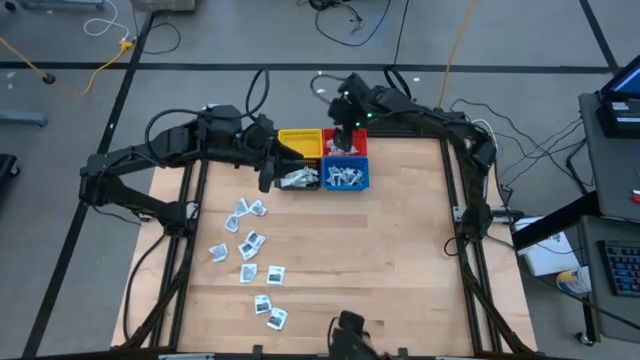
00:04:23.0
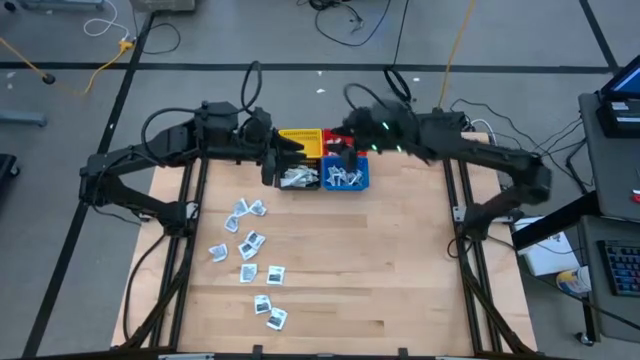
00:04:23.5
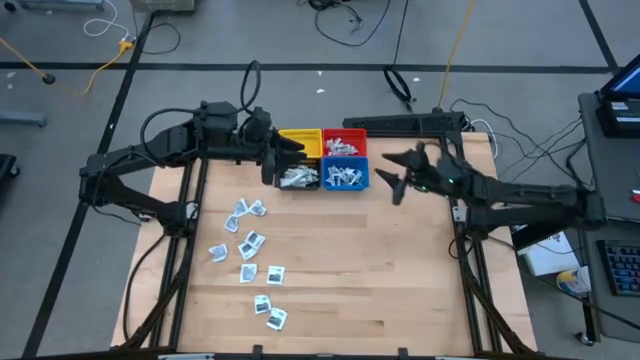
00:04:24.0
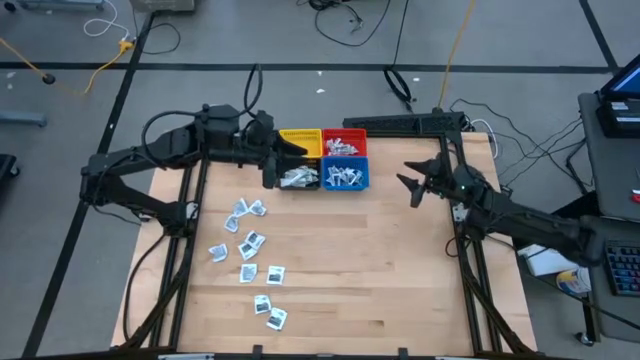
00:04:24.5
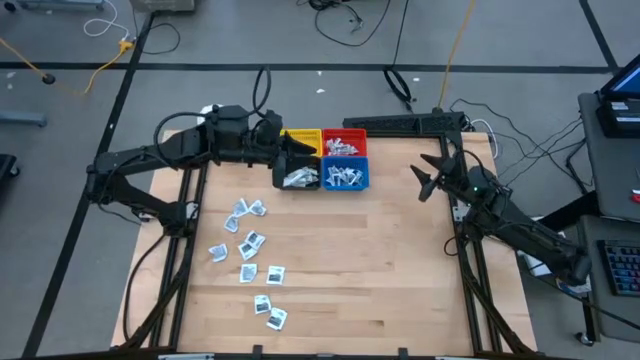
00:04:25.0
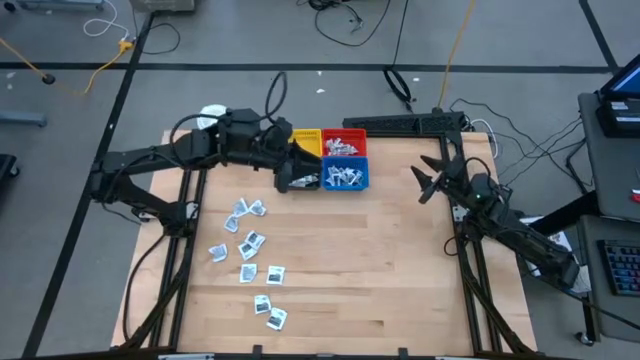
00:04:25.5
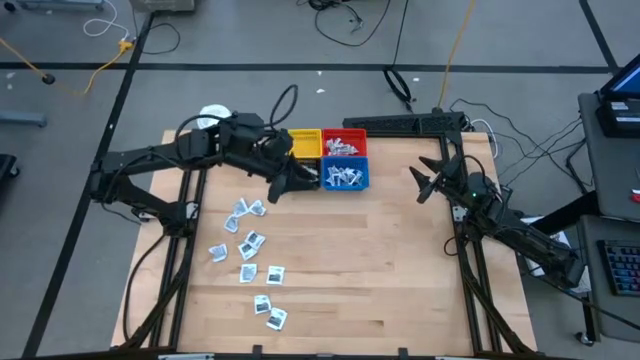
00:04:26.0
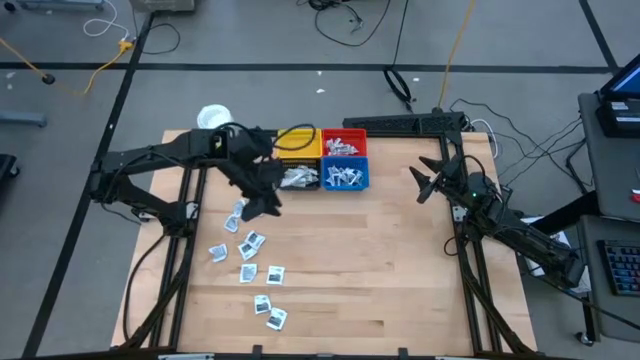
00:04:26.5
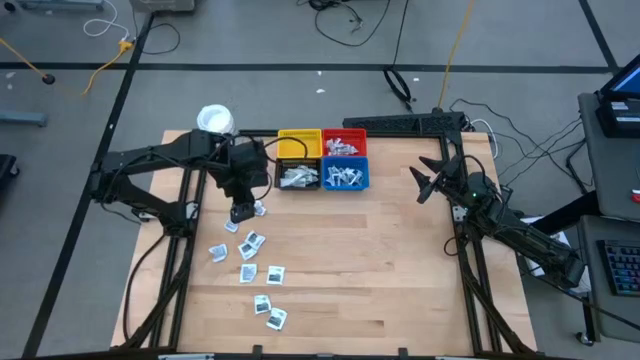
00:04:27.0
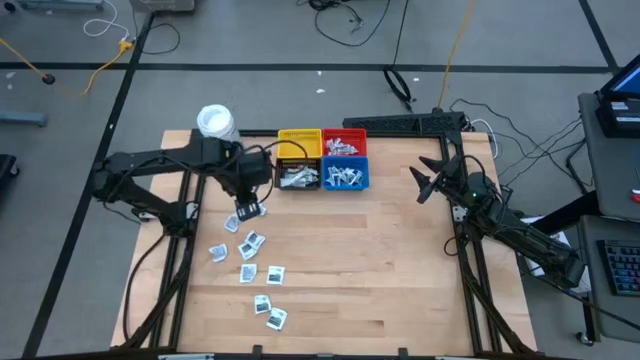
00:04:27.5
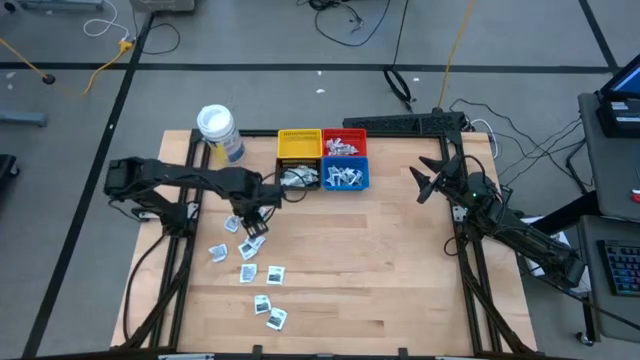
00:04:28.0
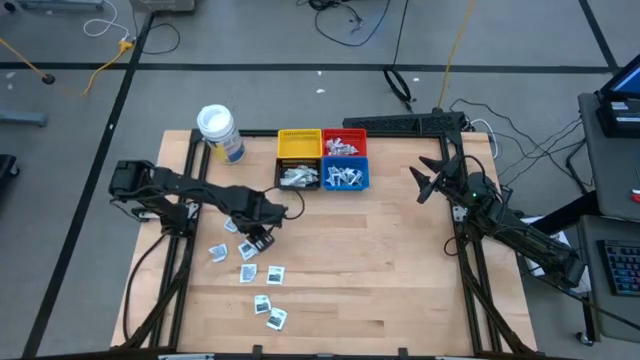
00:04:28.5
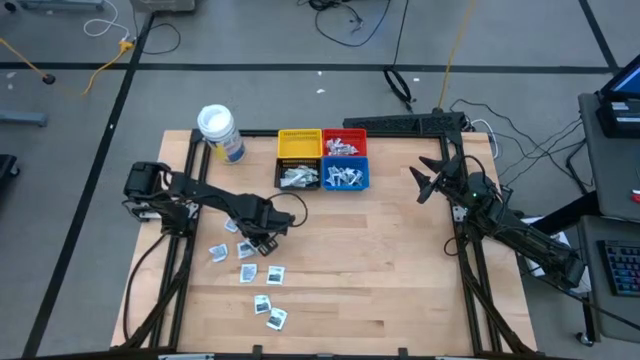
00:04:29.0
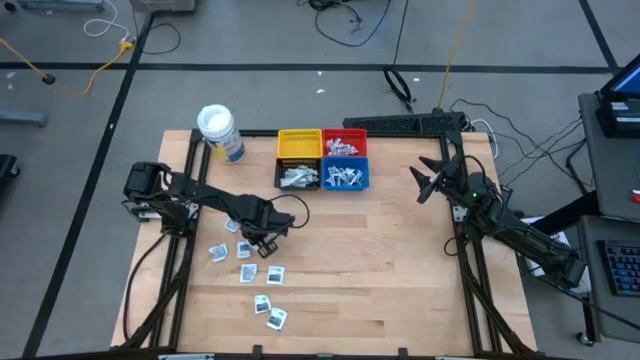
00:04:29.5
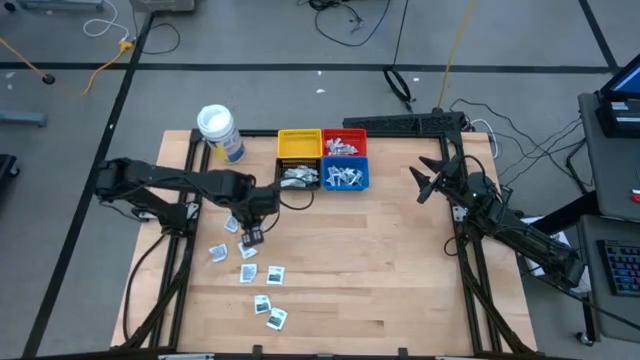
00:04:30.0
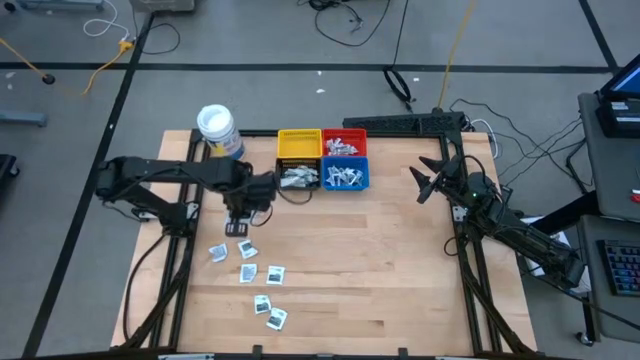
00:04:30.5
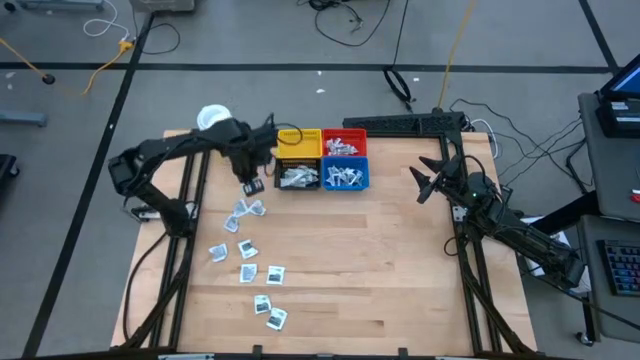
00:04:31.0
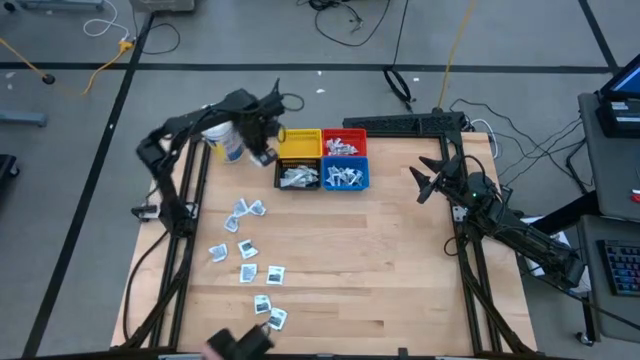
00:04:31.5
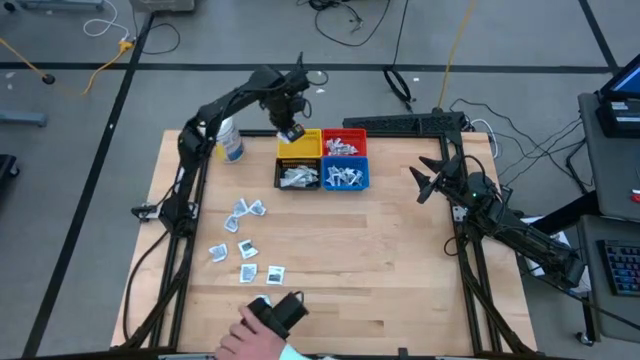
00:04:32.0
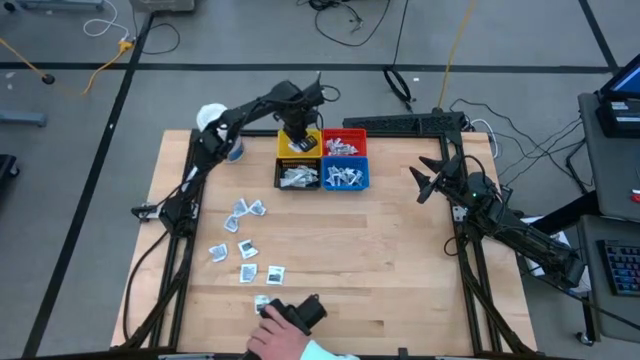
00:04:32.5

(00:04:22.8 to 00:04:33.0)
Task: Pick & Place First Aid Supplies
Put the gray towelette pack into the yellow basket

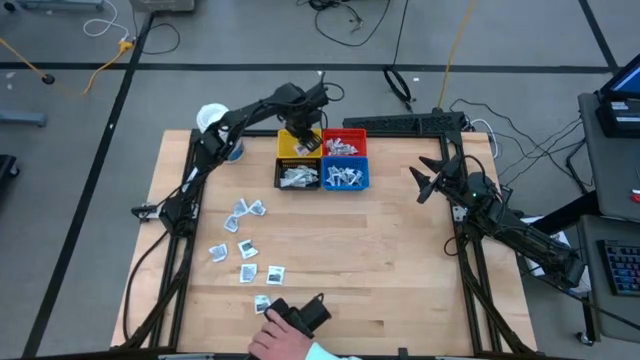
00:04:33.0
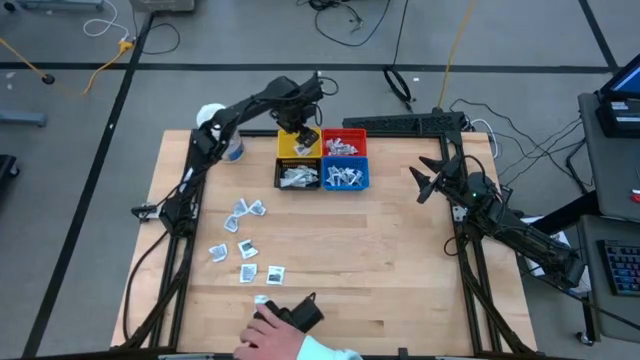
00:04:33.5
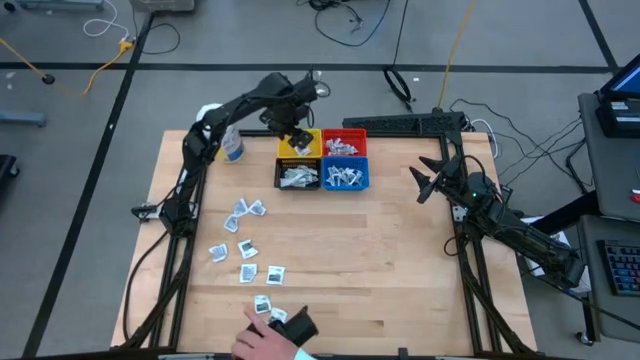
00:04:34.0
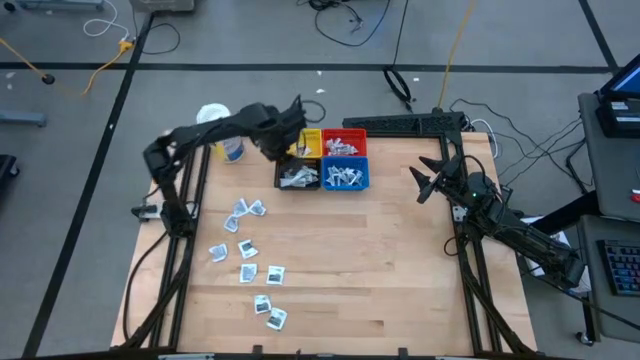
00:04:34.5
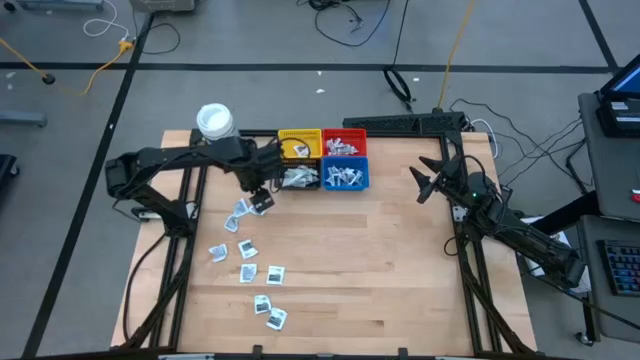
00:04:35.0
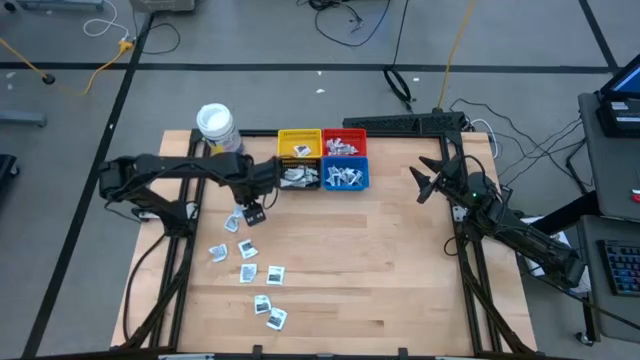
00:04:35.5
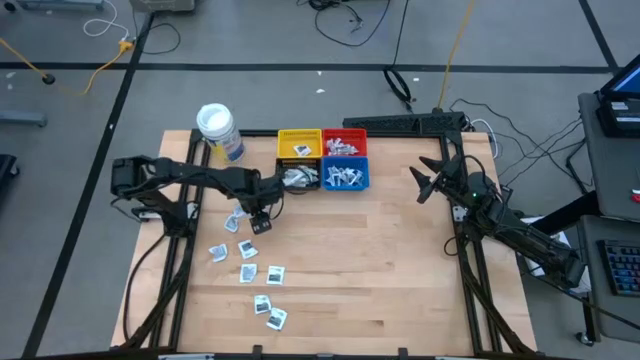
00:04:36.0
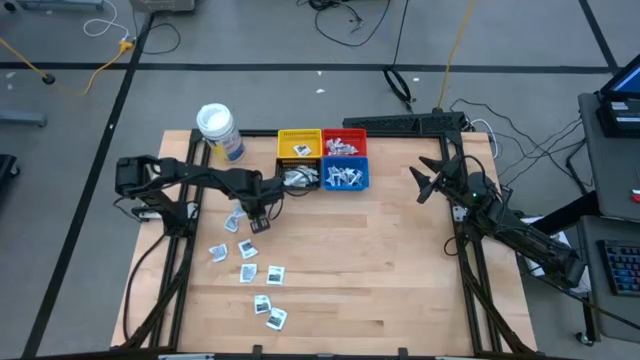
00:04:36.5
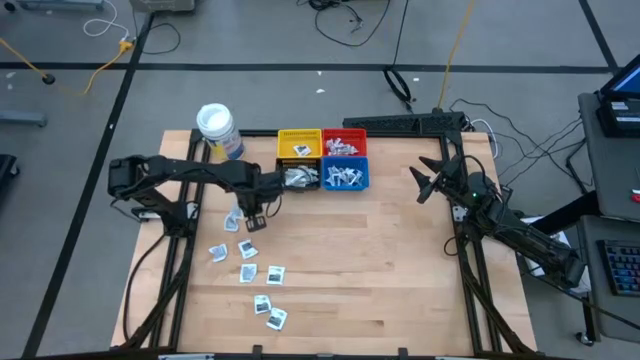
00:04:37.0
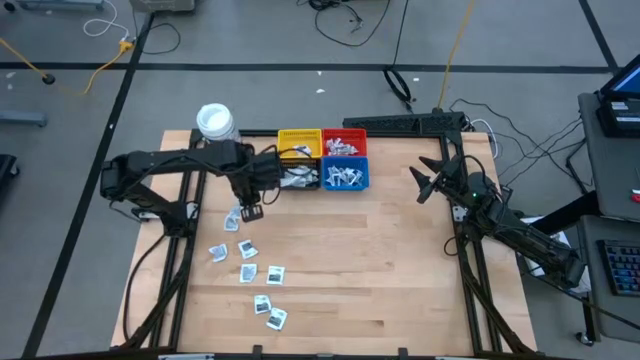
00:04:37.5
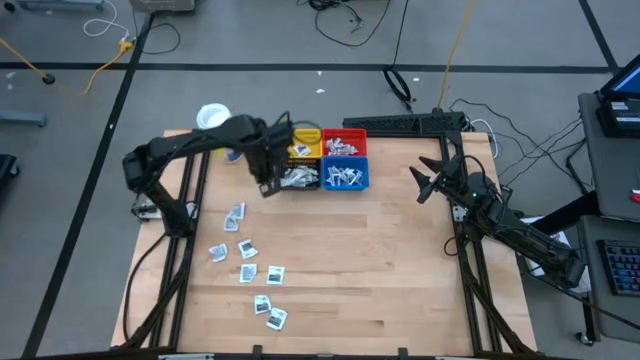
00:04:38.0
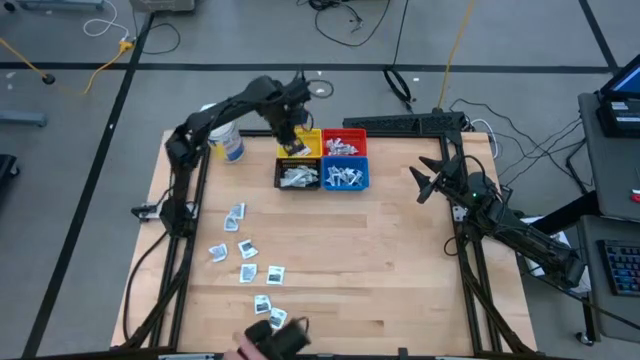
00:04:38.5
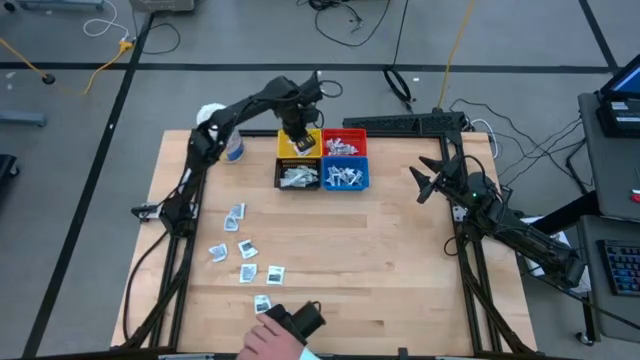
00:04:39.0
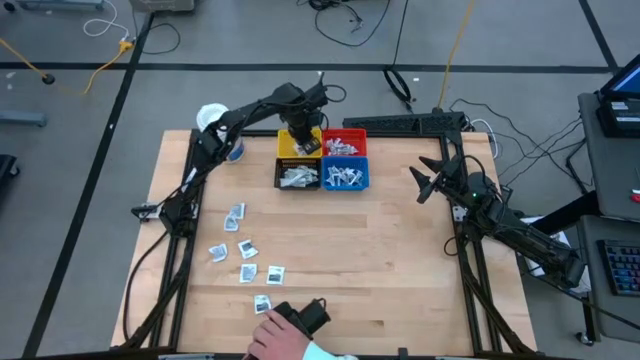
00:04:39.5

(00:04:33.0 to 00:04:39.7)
Put the gray towelette pack into the yellow basket

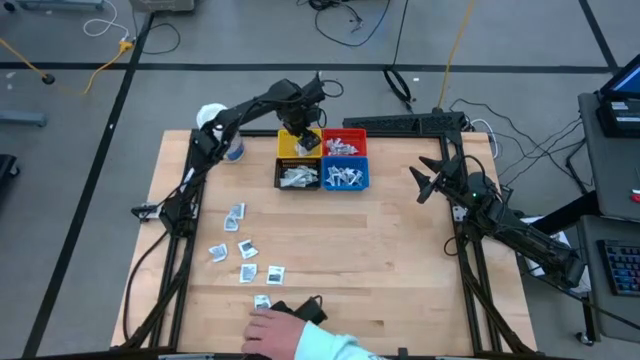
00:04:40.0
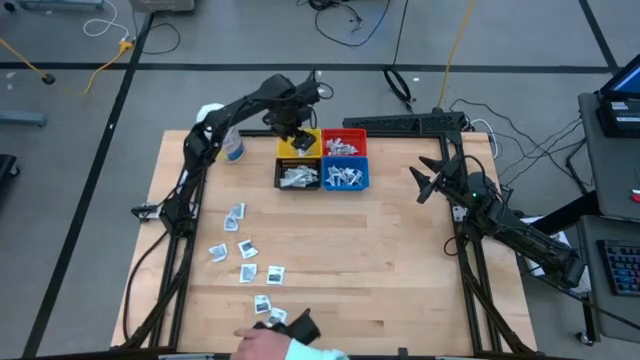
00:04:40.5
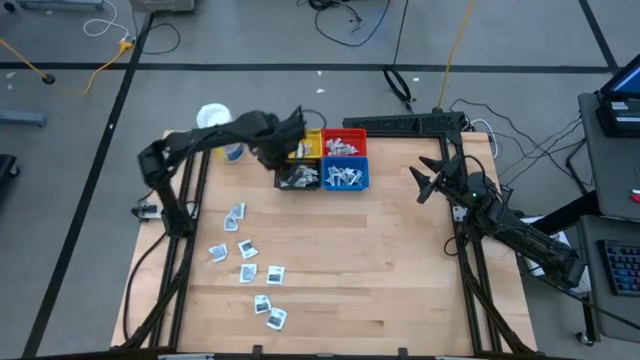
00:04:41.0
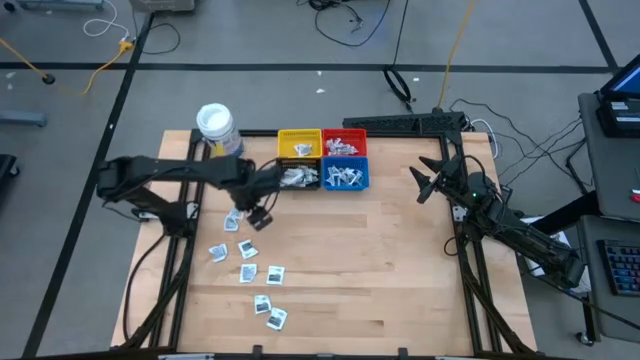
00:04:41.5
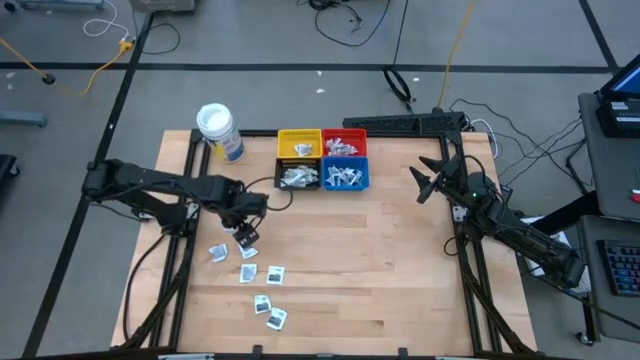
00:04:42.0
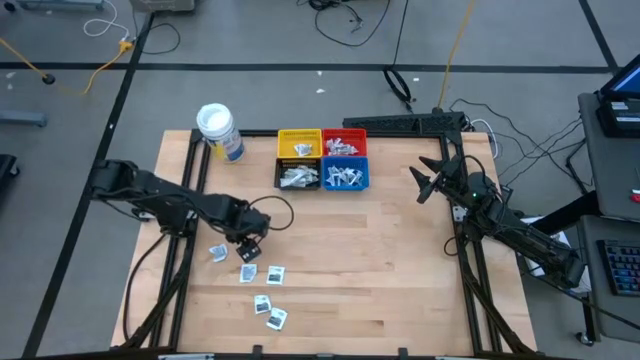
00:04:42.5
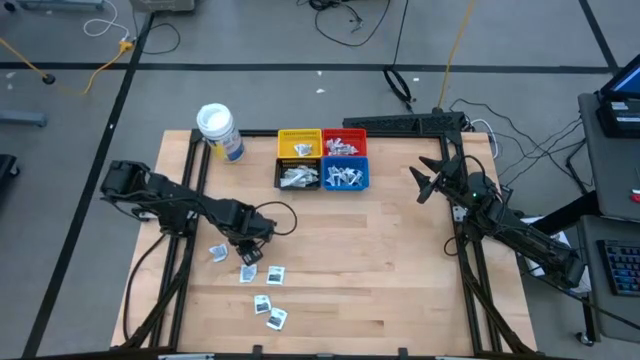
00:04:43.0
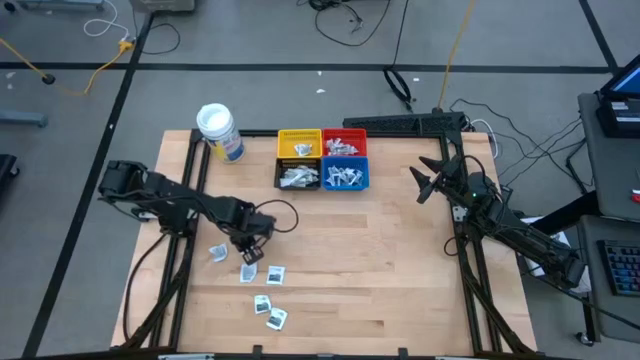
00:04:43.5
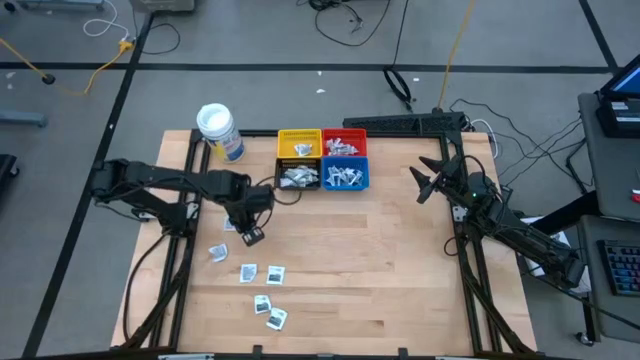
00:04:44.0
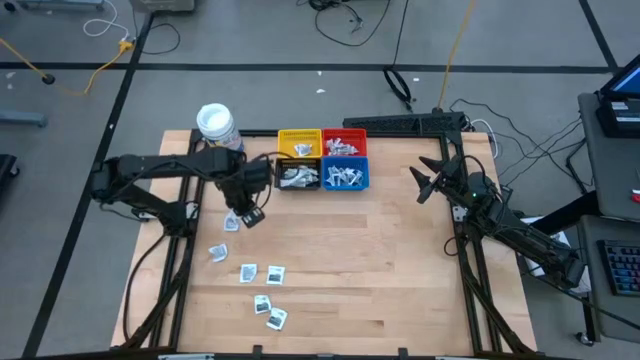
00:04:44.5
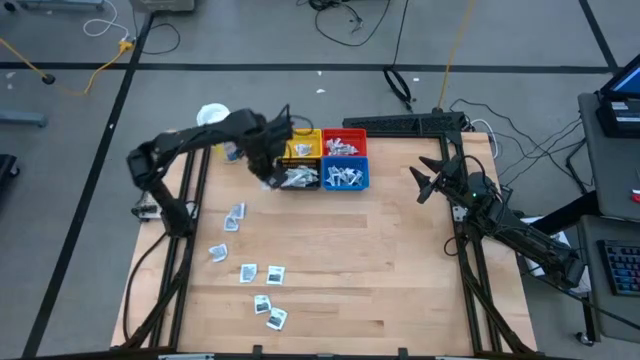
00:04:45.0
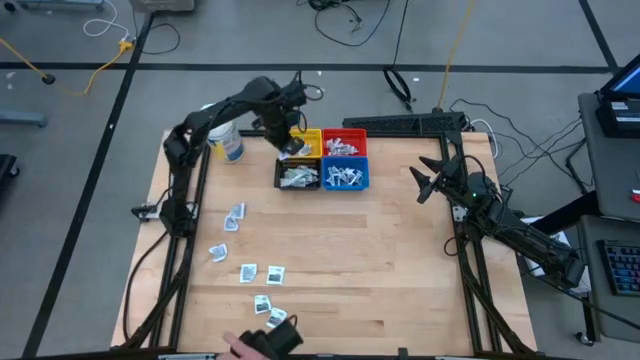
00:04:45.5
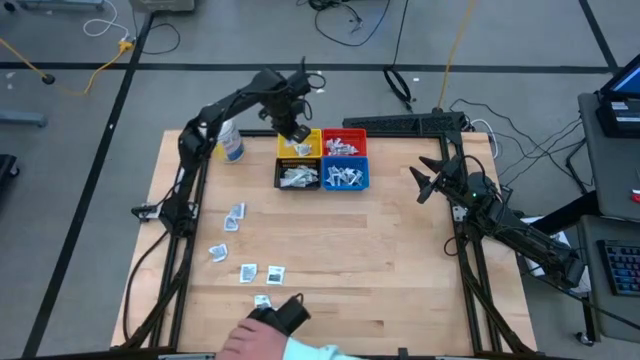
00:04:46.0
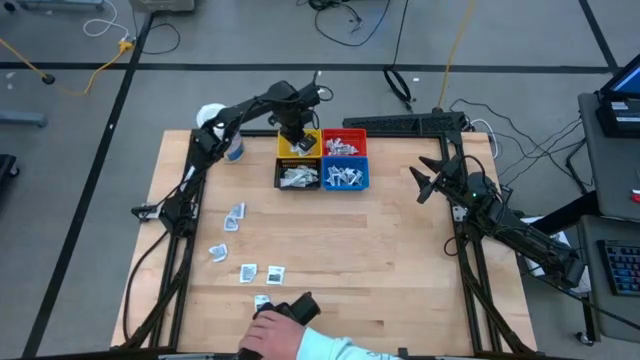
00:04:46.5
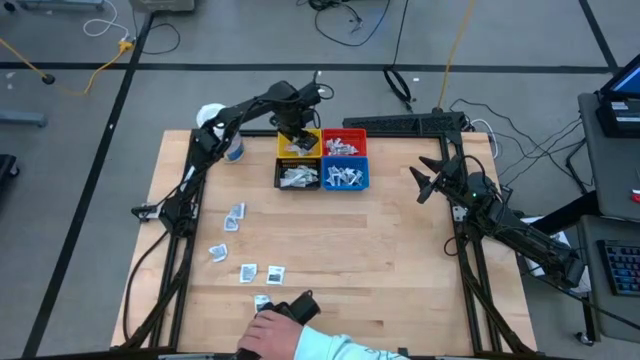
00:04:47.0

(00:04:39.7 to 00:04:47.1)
Put the gray towelette pack into the yellow basket
